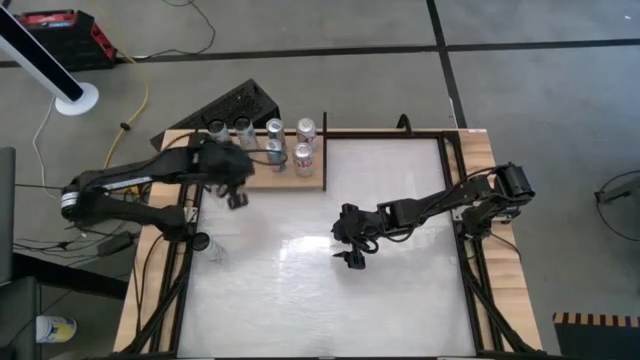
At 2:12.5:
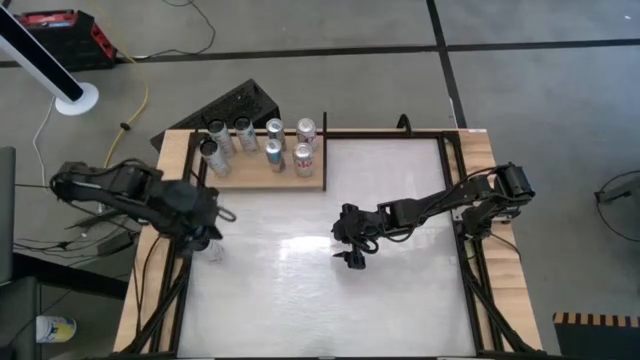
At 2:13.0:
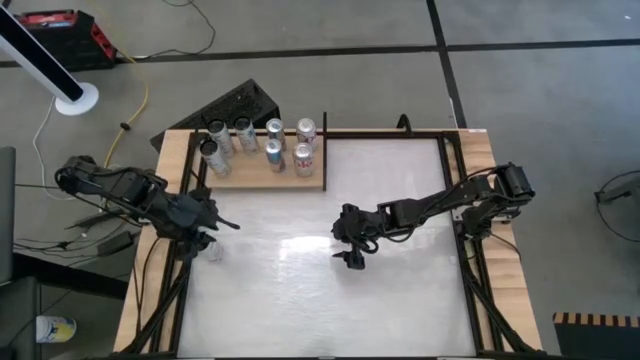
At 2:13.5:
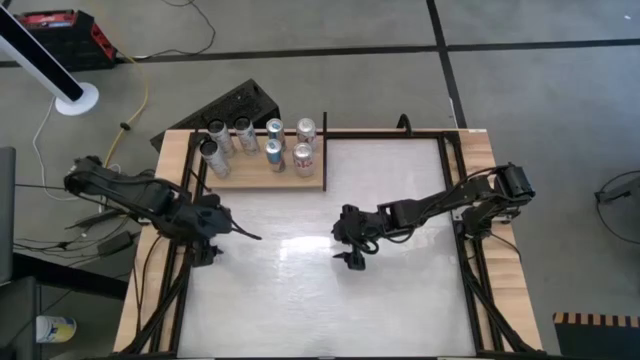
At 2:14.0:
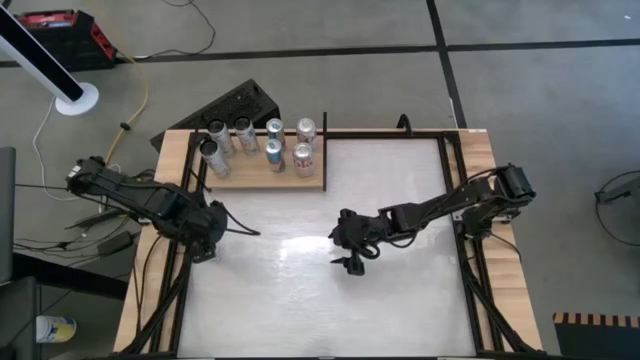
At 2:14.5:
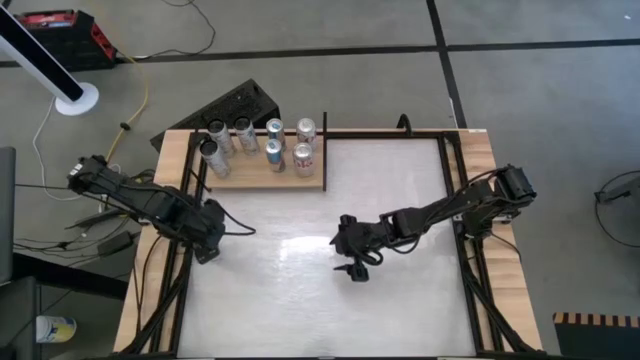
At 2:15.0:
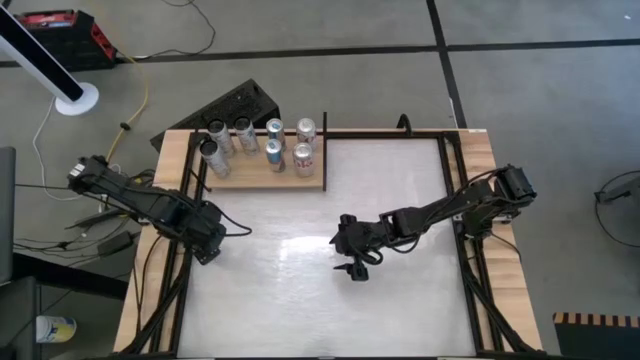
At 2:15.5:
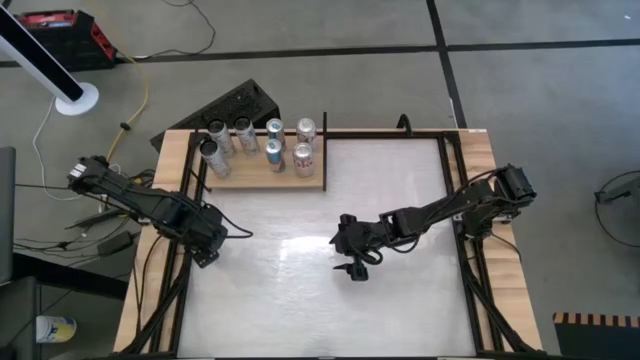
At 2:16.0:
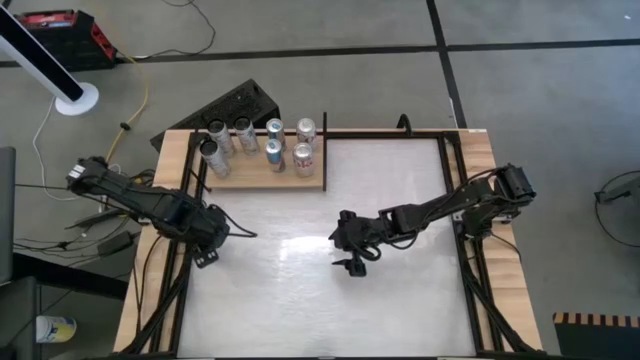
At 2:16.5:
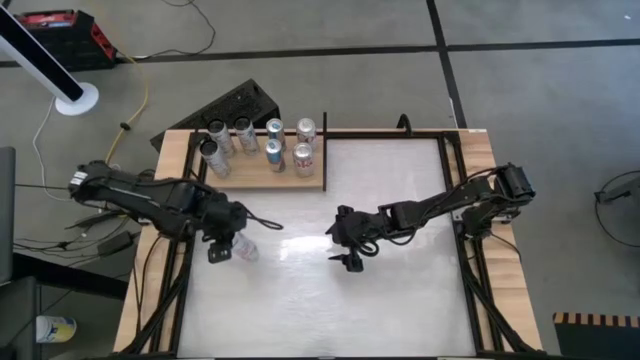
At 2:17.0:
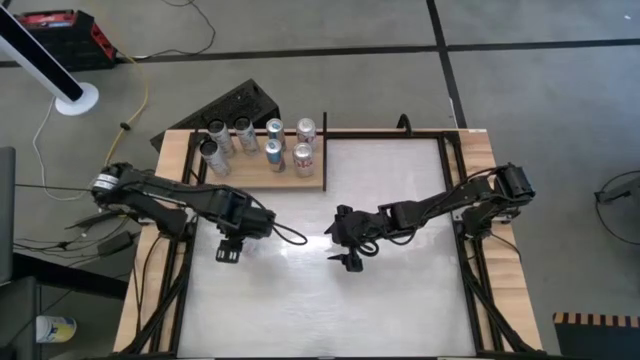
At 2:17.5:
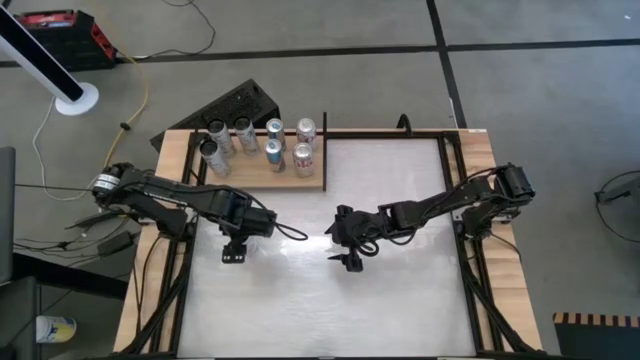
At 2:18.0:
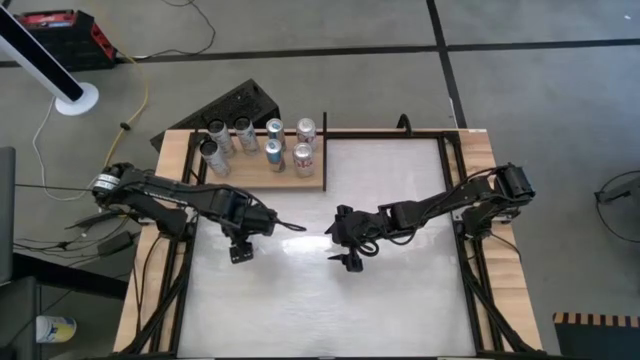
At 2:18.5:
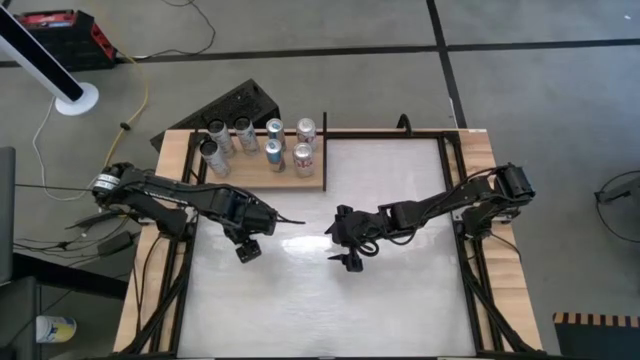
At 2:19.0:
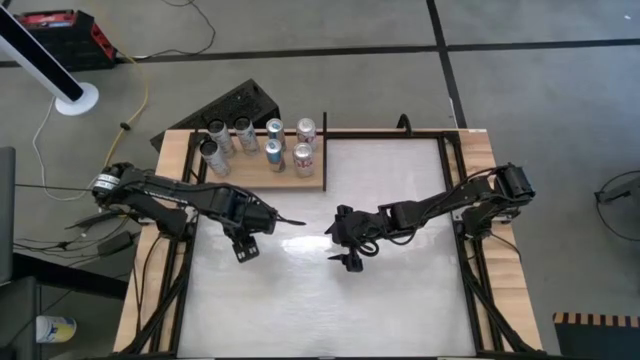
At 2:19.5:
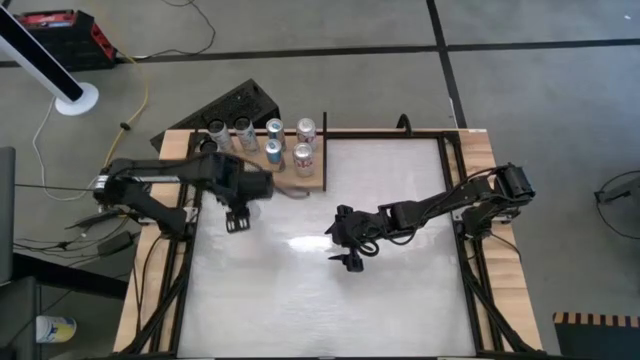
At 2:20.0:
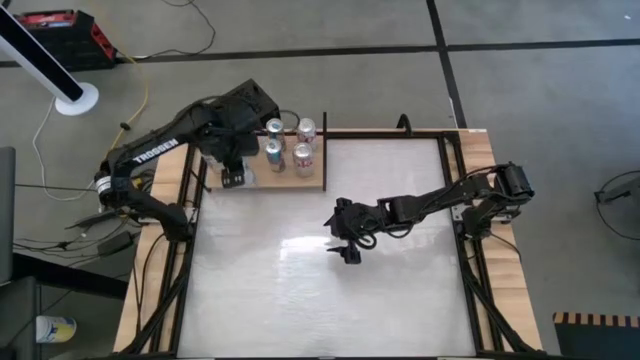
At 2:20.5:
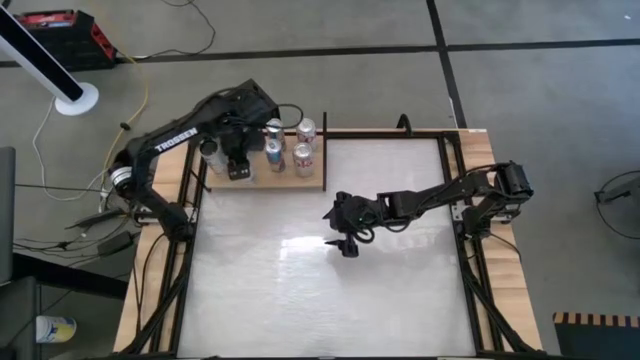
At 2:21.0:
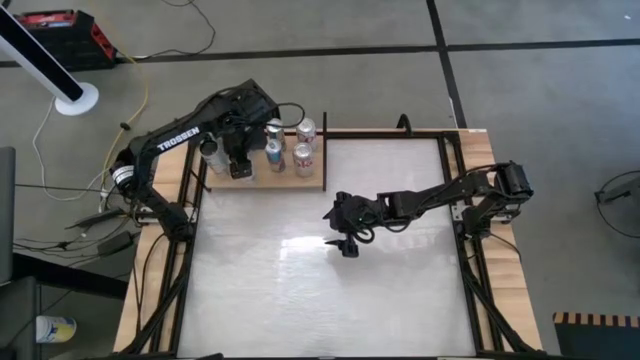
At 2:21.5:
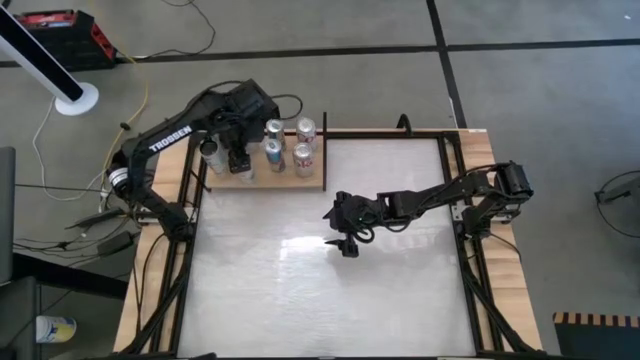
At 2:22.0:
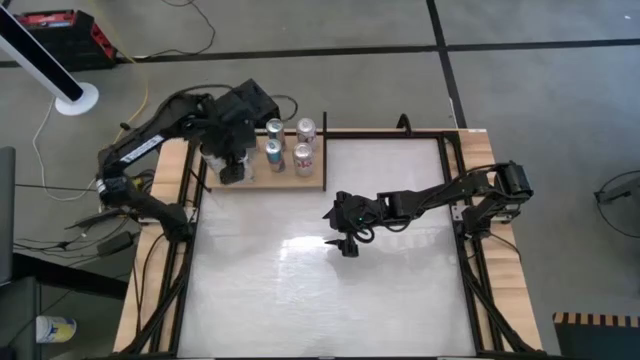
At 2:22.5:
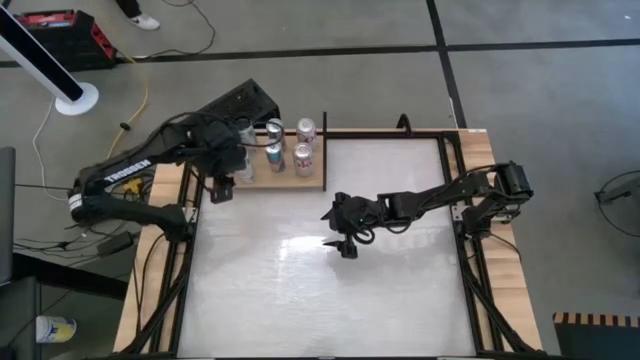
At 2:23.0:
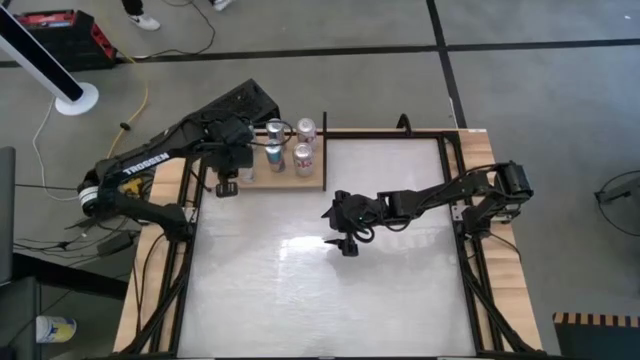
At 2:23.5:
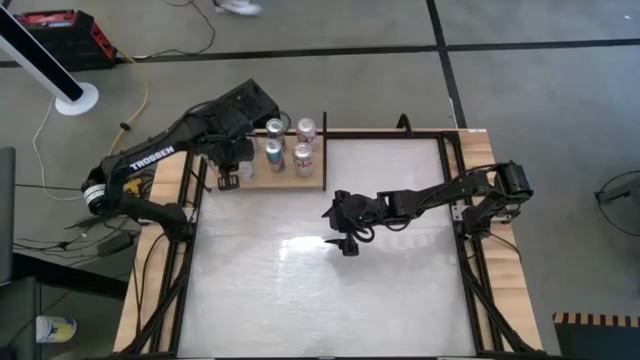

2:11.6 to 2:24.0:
Task: Place canned beverage on shelf
Put the white-pink soda can on the shelf aligned with the other white-pink soda can

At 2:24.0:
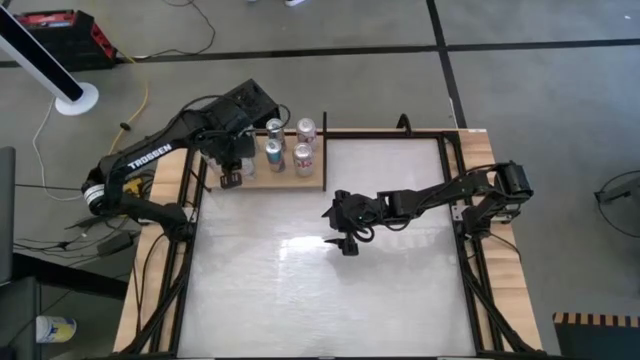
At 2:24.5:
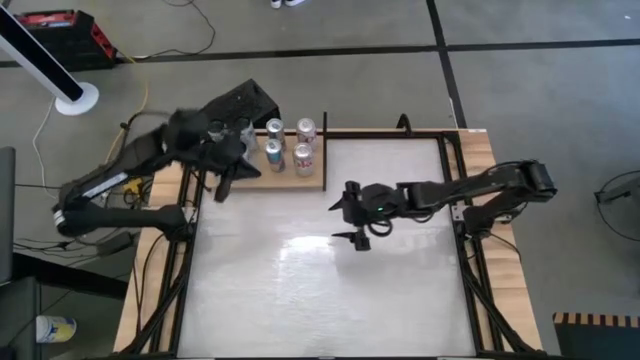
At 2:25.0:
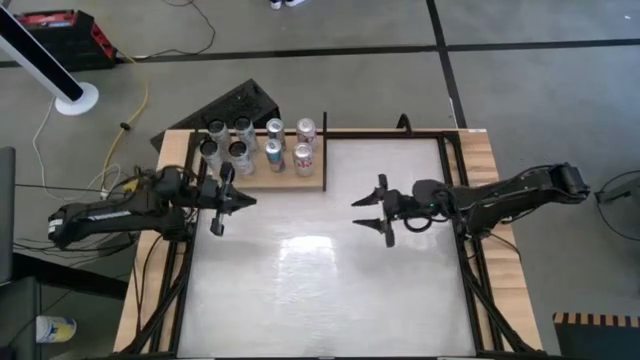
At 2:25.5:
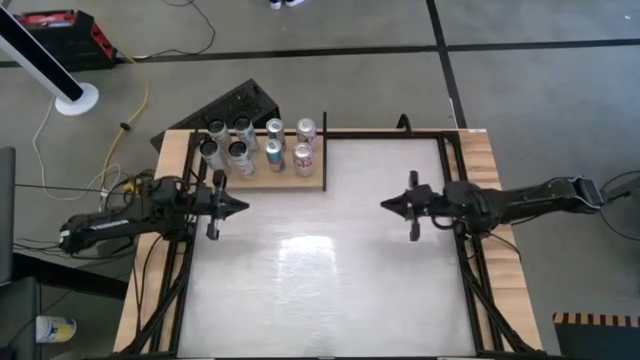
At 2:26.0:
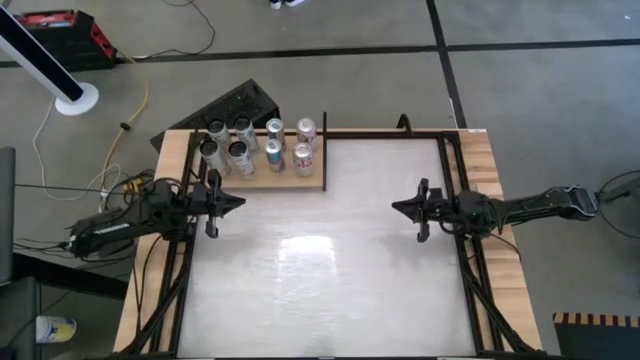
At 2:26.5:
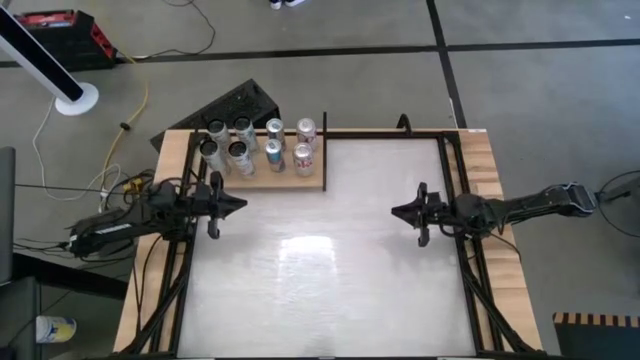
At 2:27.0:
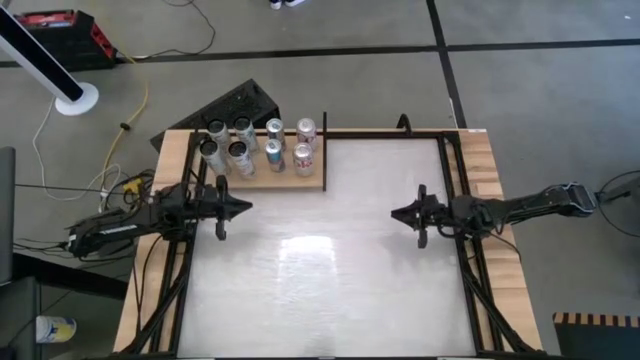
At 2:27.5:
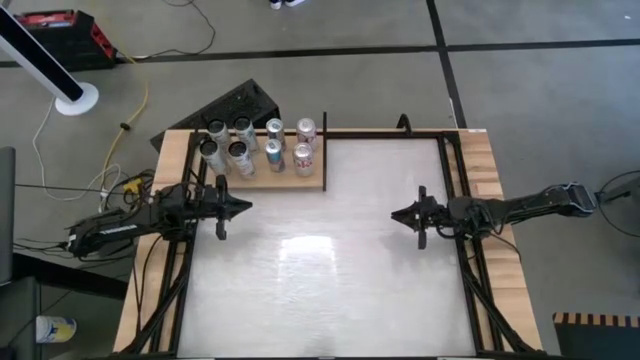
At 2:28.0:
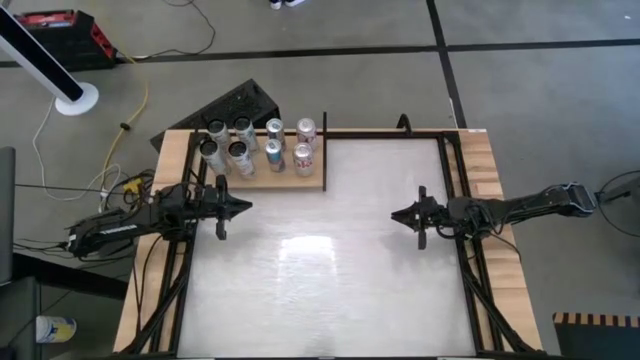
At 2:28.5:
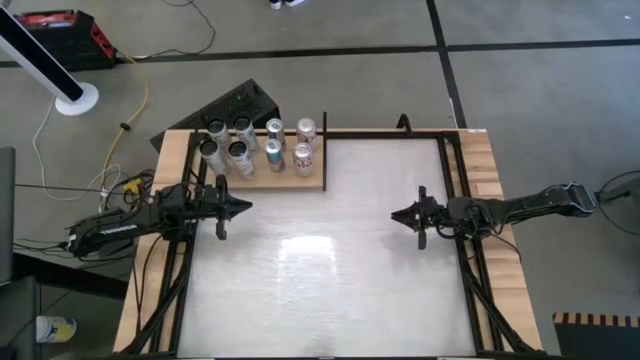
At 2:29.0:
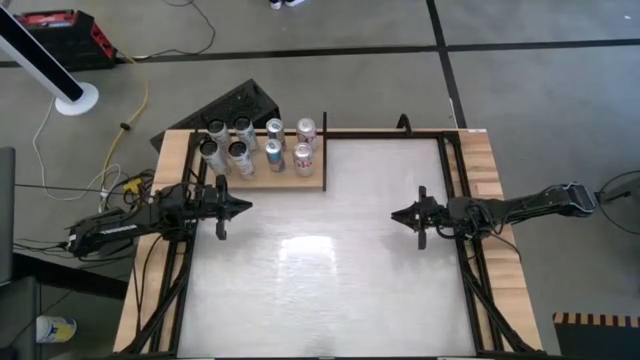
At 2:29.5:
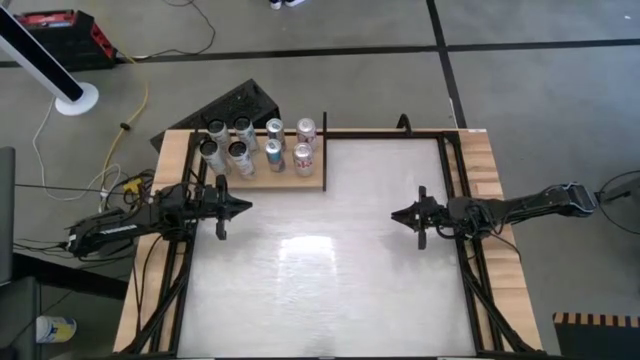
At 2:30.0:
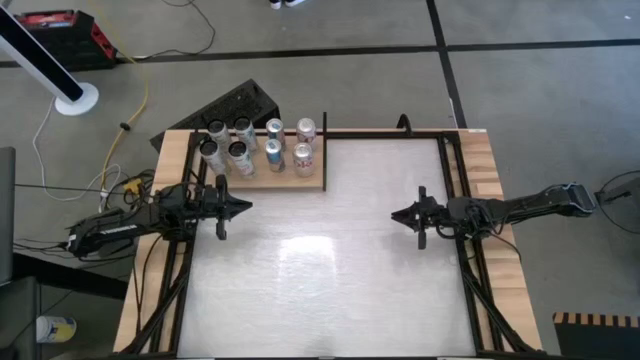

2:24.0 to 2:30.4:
Return to Home Position

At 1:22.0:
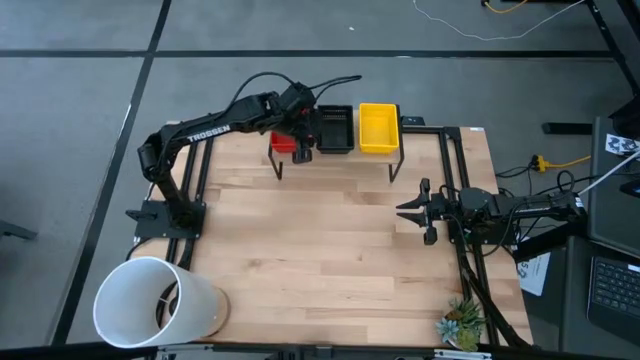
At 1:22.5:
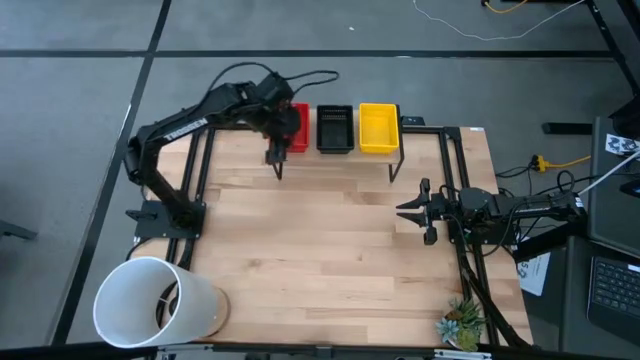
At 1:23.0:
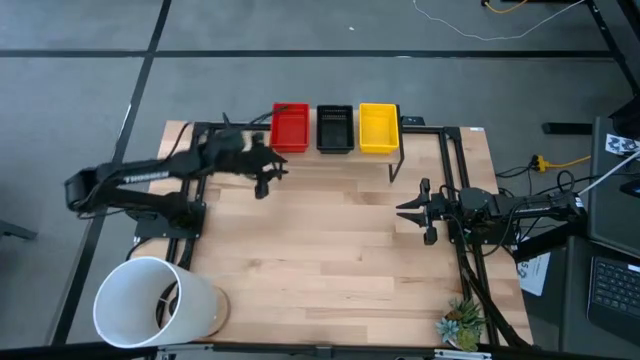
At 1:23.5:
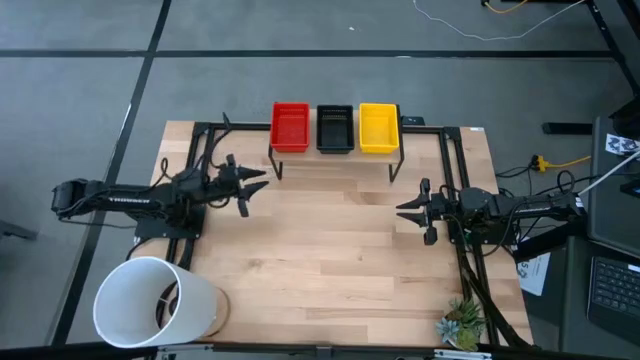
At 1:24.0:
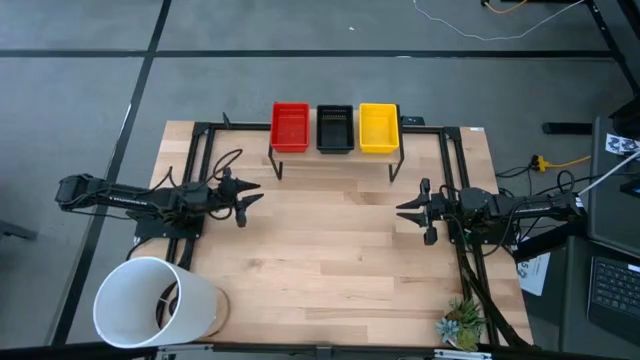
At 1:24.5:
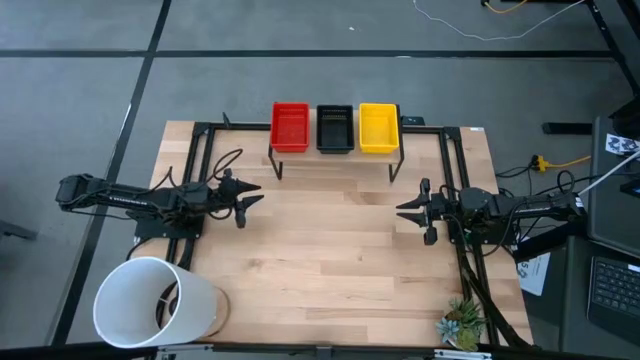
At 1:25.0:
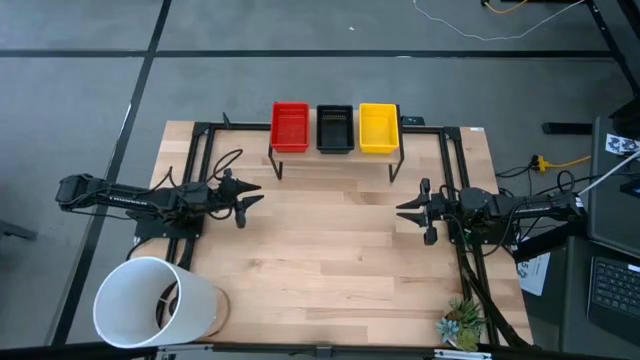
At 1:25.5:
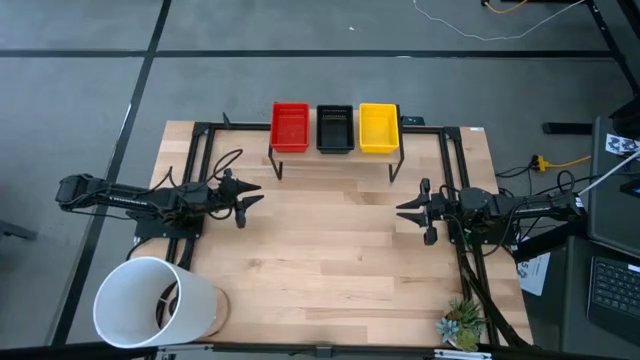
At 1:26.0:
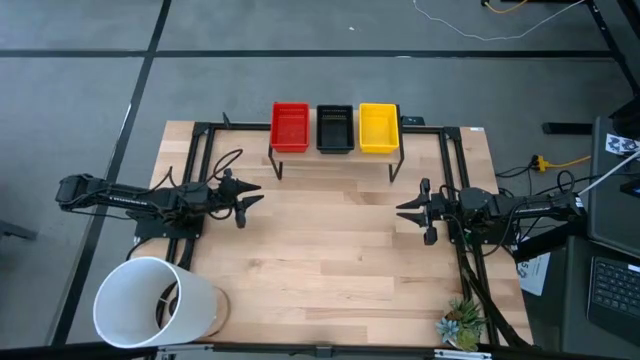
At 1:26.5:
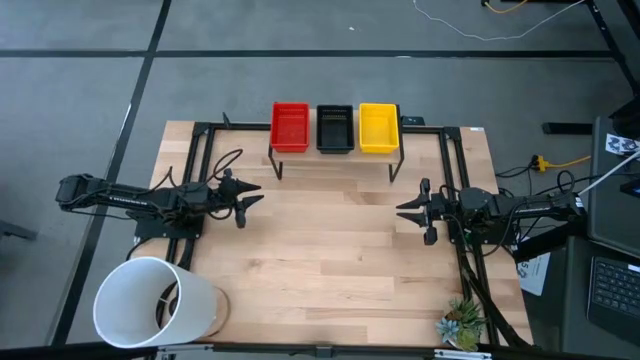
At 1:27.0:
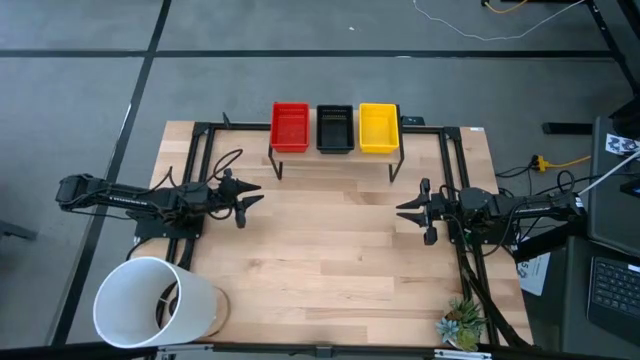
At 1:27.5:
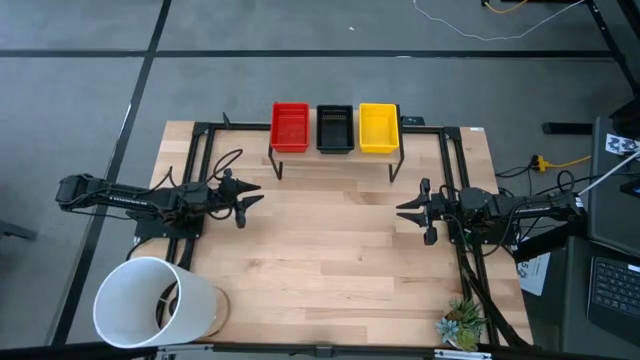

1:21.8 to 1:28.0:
Task: Stack baskets on shelf by color
Return to Home Position
